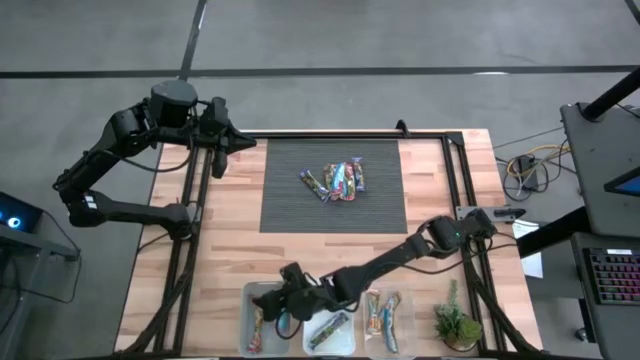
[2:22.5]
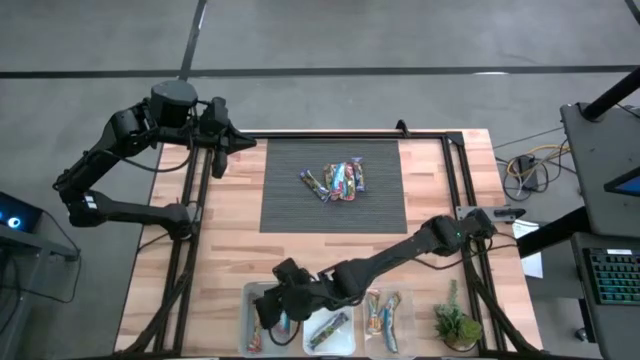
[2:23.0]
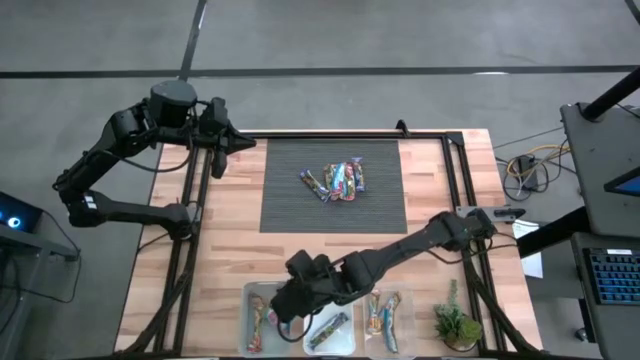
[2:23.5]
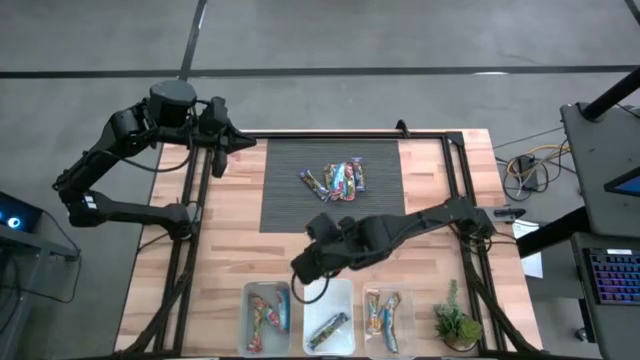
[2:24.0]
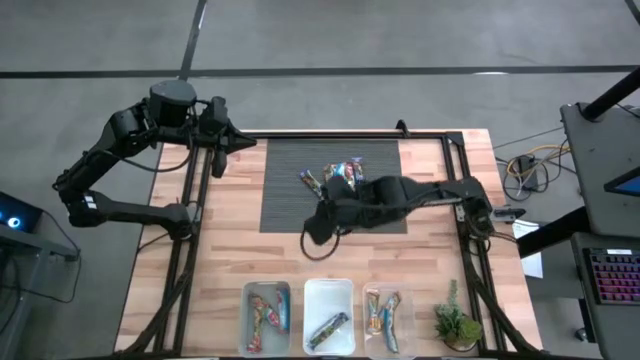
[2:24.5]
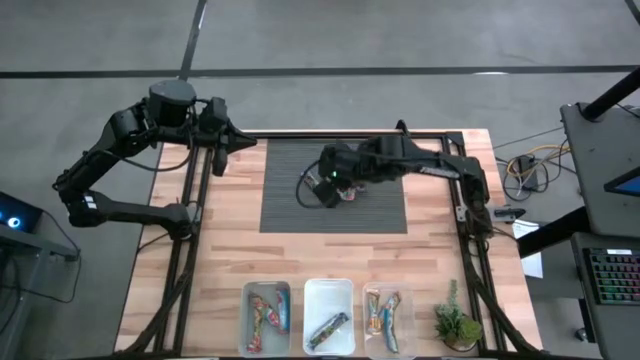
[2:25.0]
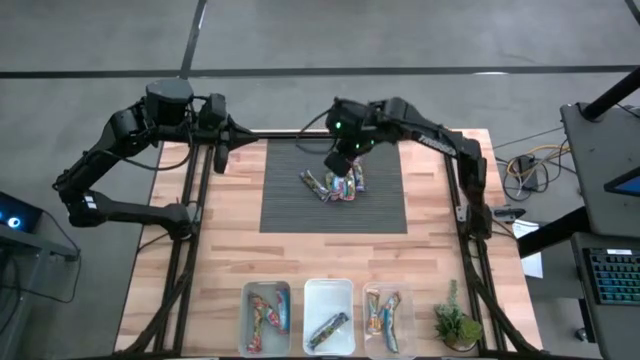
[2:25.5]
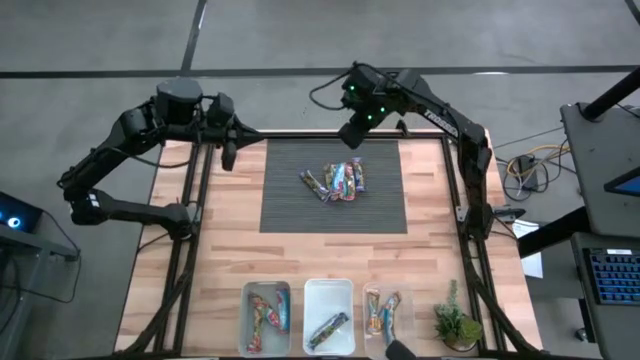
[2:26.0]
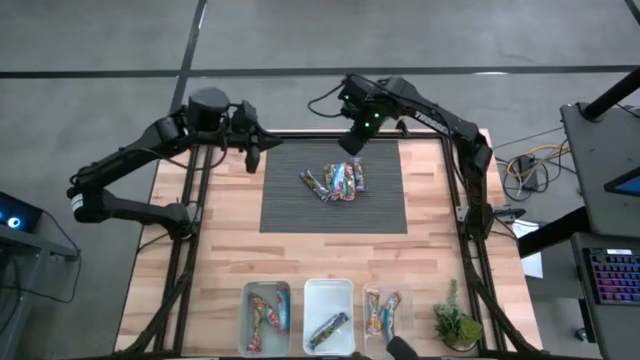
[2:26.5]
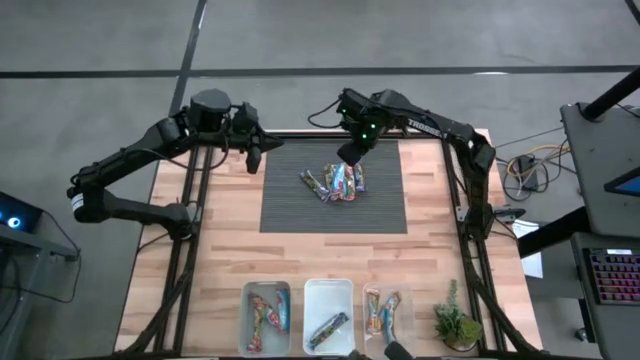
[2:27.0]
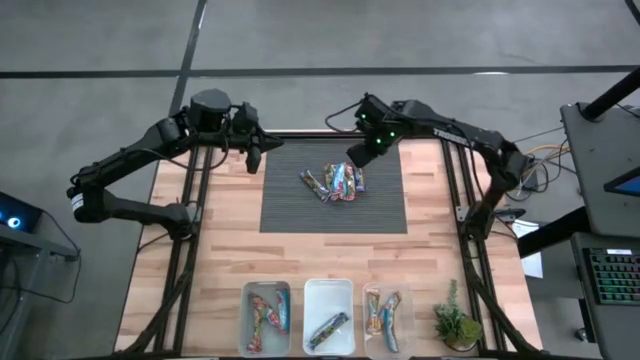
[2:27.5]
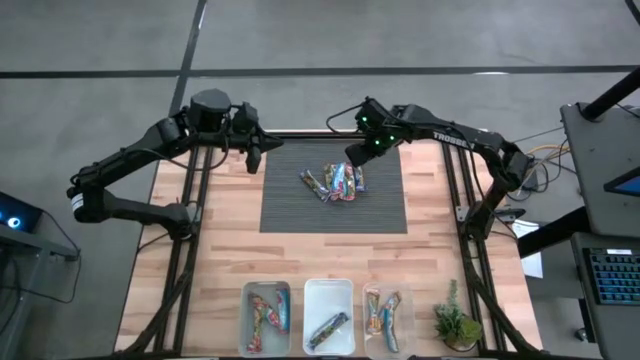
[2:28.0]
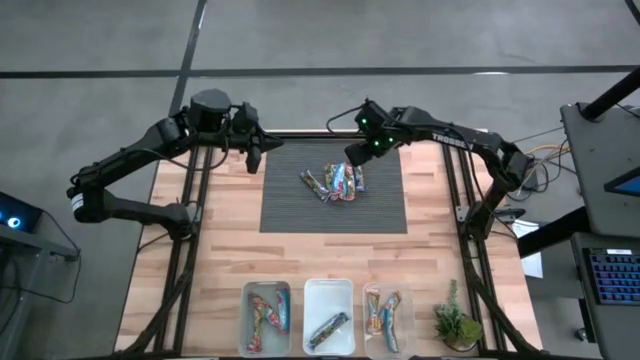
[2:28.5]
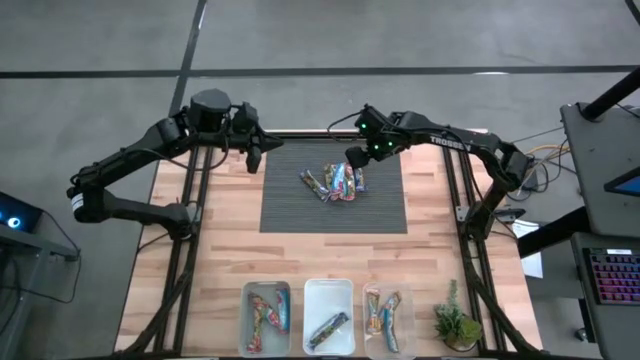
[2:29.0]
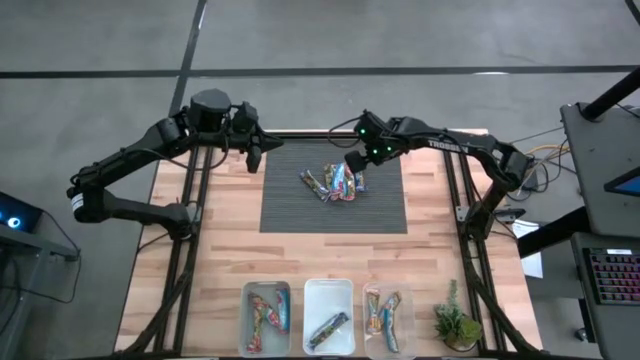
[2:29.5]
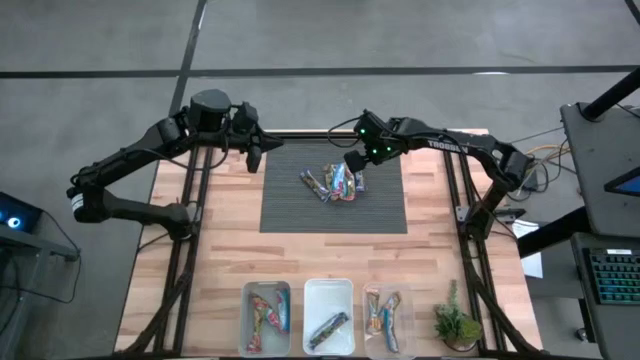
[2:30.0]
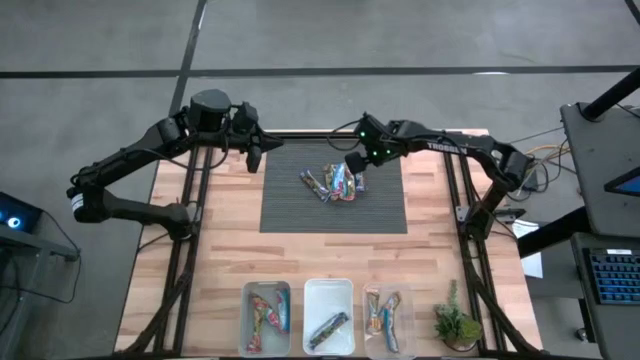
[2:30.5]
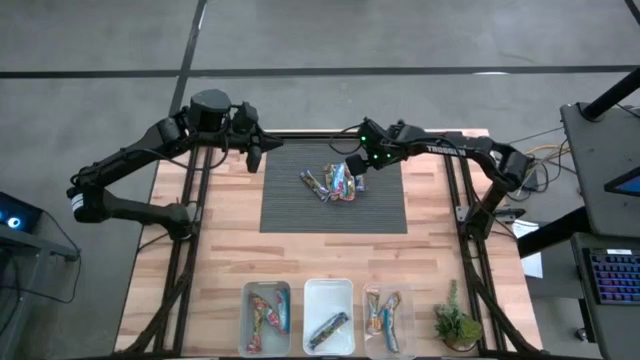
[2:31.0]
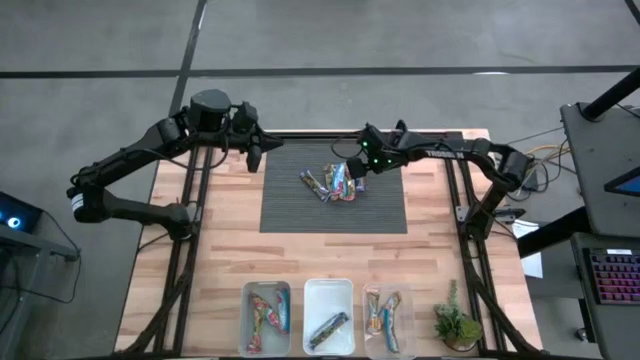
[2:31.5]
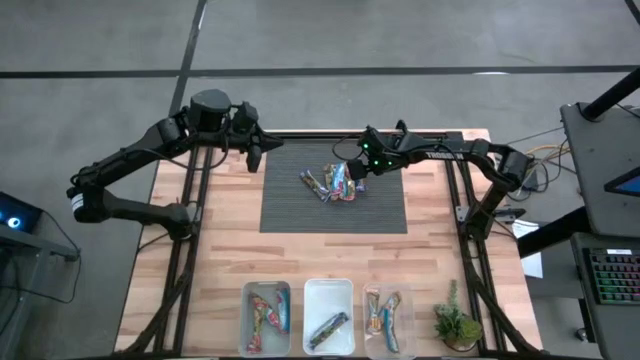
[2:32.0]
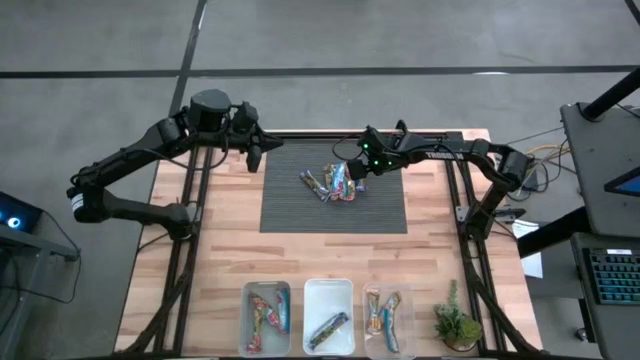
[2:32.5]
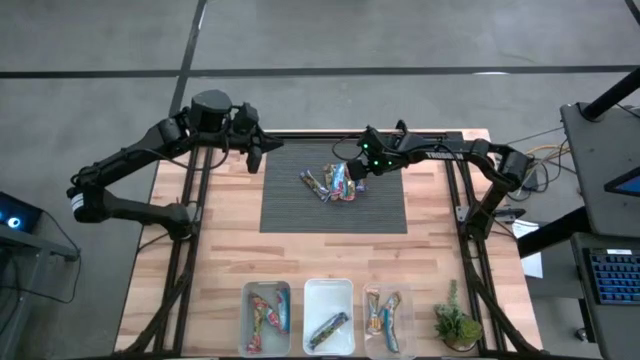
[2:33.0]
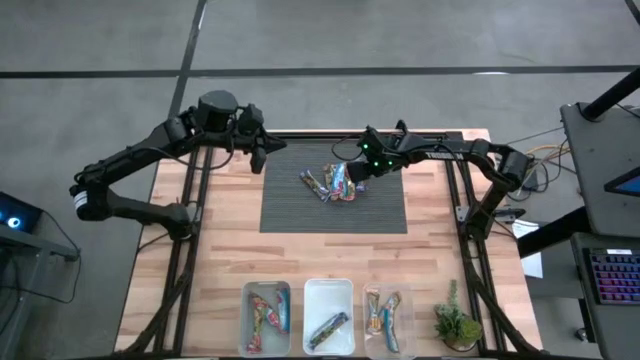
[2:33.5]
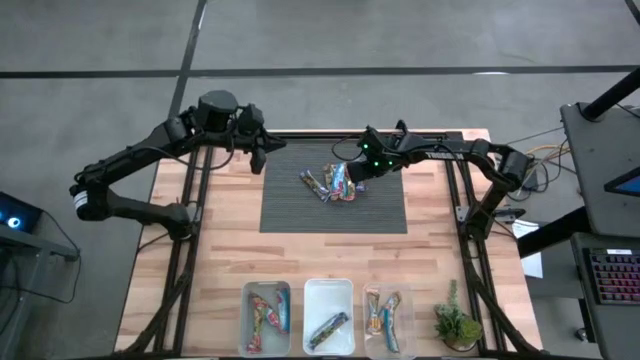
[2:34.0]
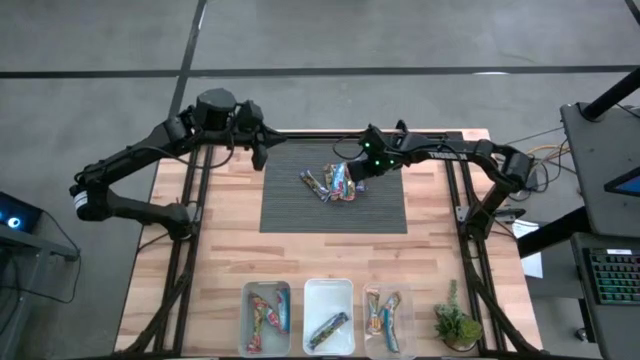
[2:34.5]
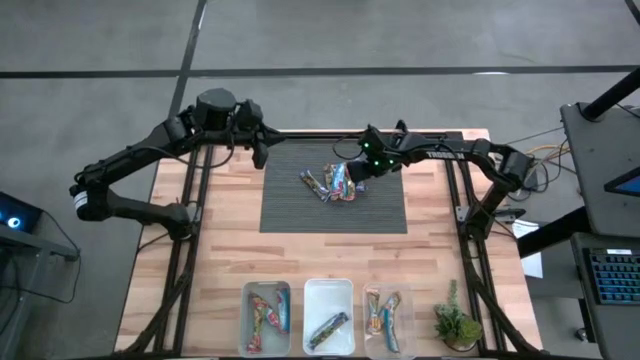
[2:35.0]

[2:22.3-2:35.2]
Task: Pick and place Granola Bars by type
Put the right blue granola bar into the white bin

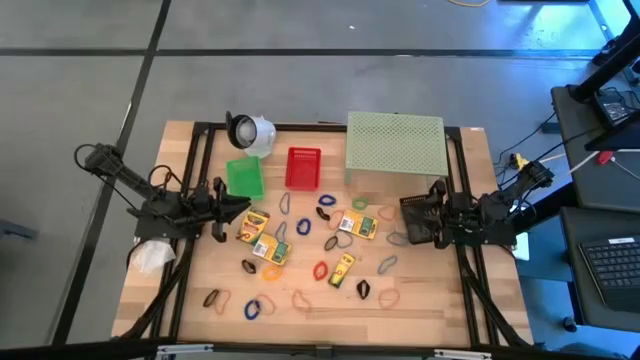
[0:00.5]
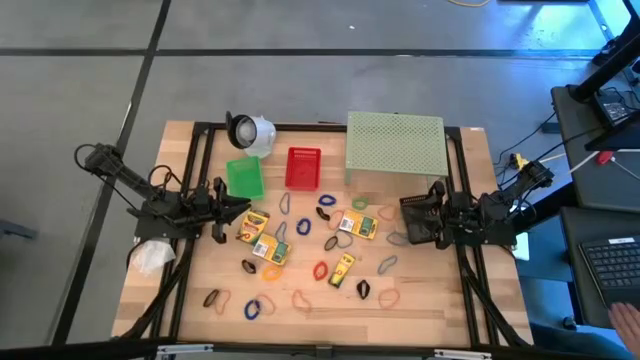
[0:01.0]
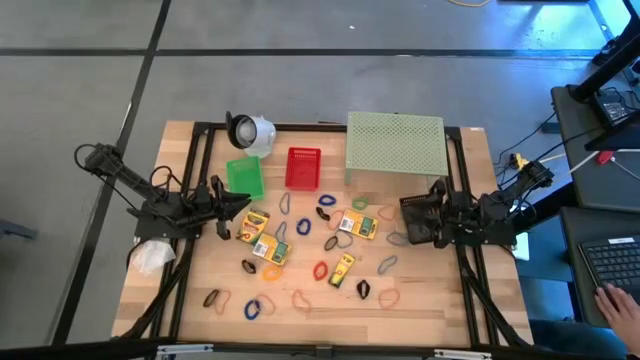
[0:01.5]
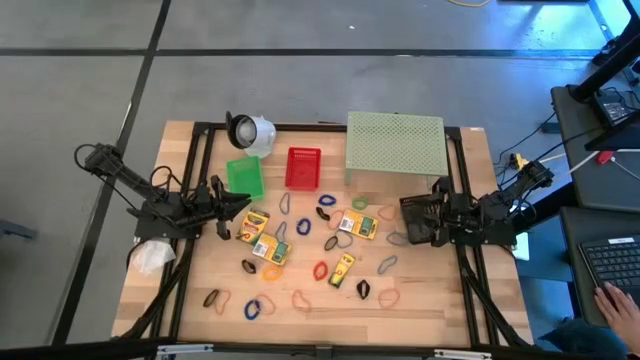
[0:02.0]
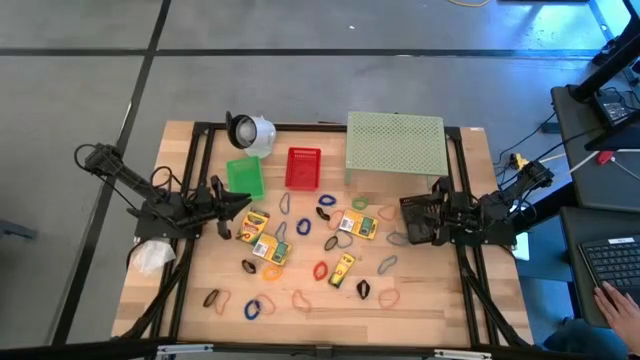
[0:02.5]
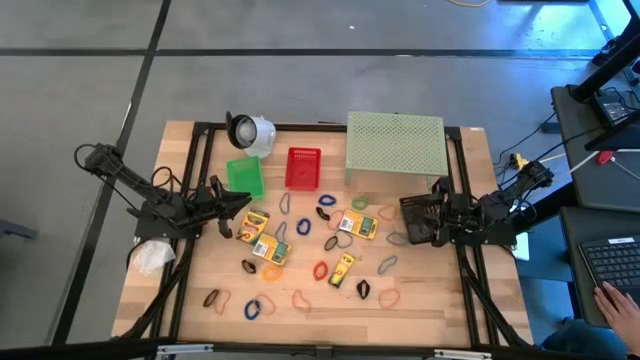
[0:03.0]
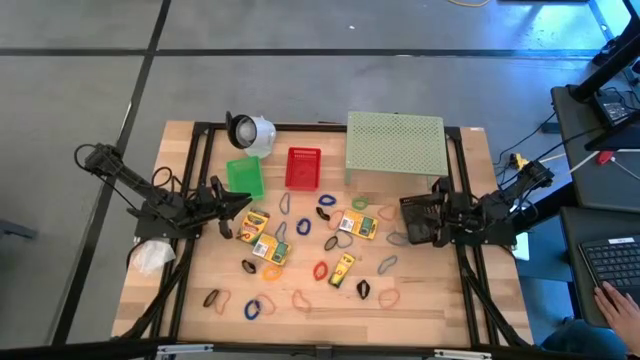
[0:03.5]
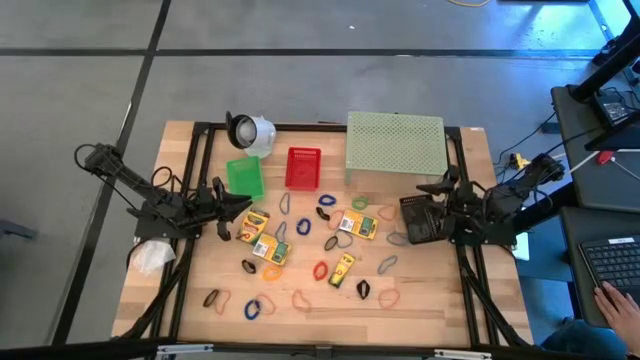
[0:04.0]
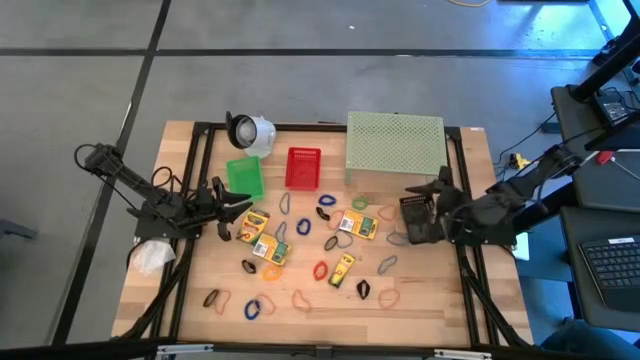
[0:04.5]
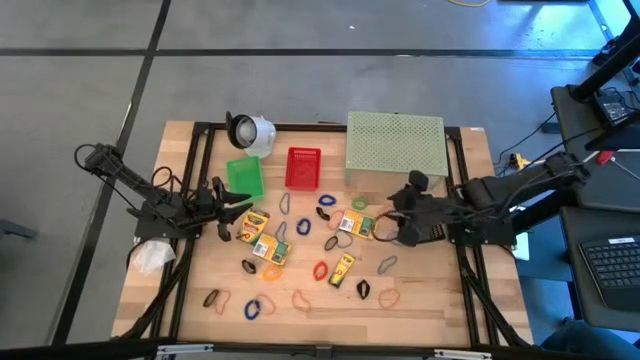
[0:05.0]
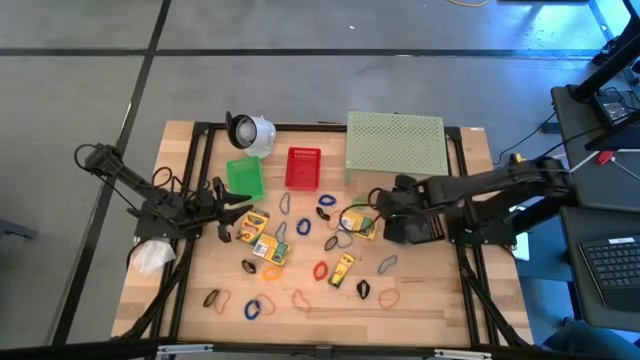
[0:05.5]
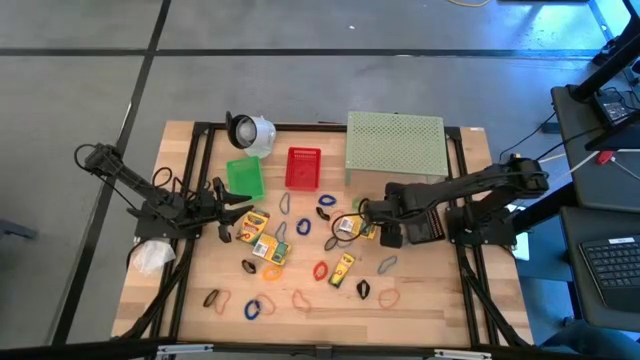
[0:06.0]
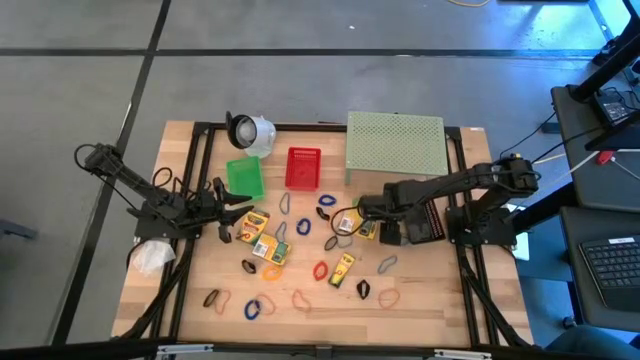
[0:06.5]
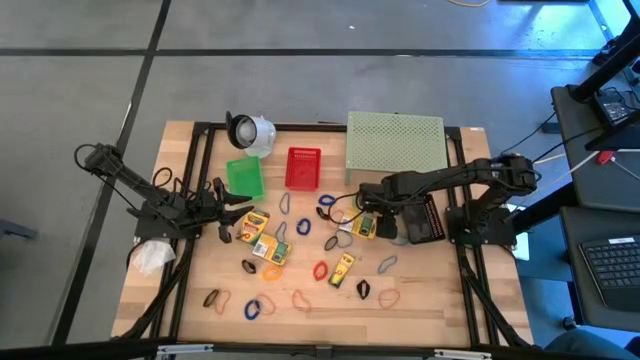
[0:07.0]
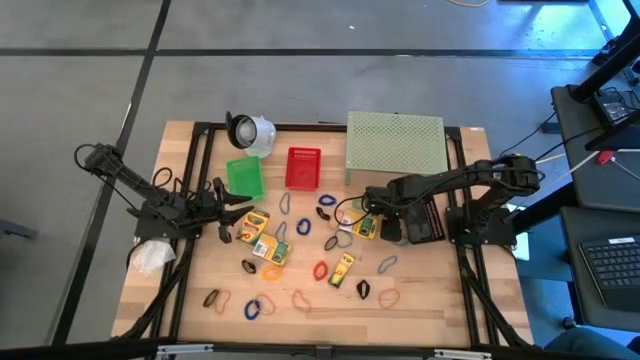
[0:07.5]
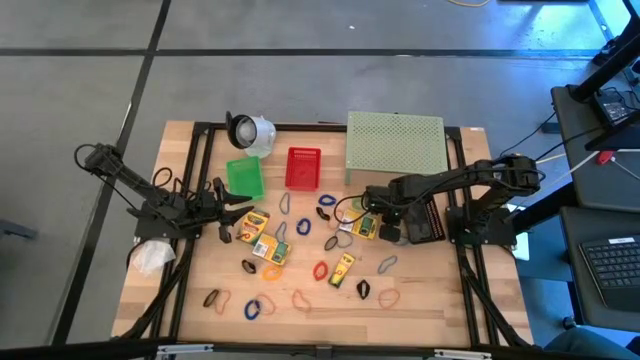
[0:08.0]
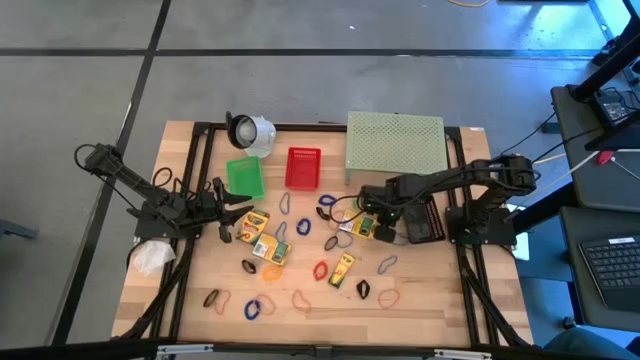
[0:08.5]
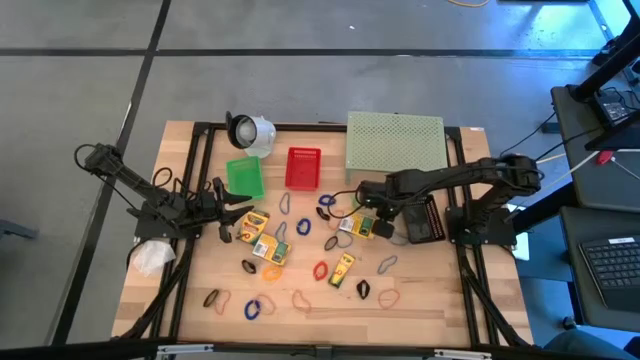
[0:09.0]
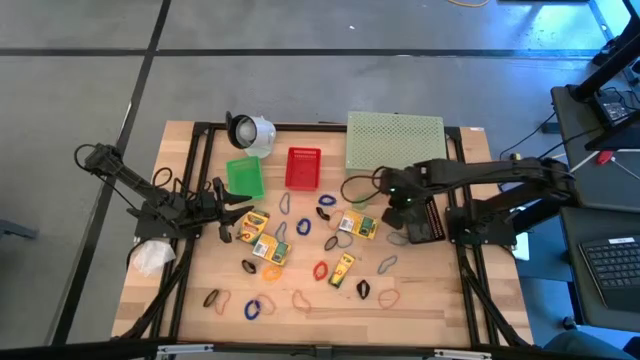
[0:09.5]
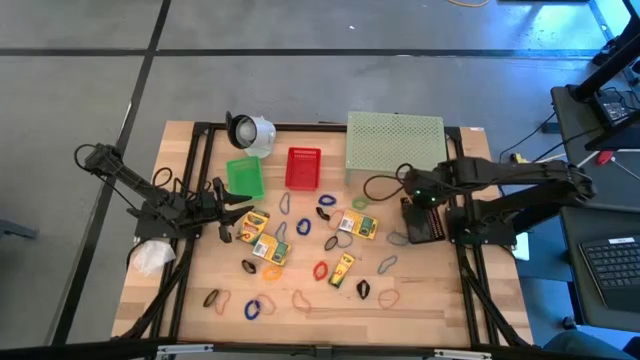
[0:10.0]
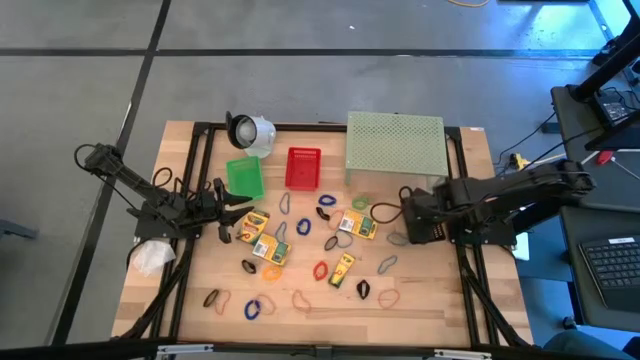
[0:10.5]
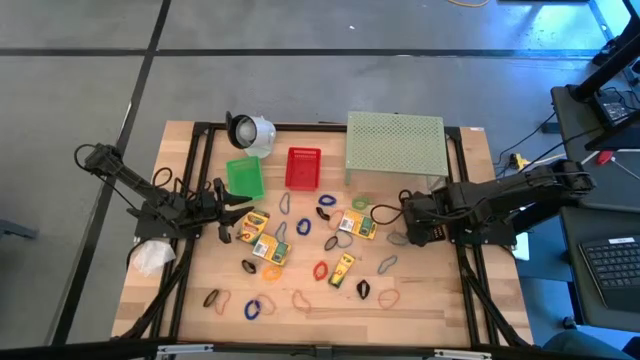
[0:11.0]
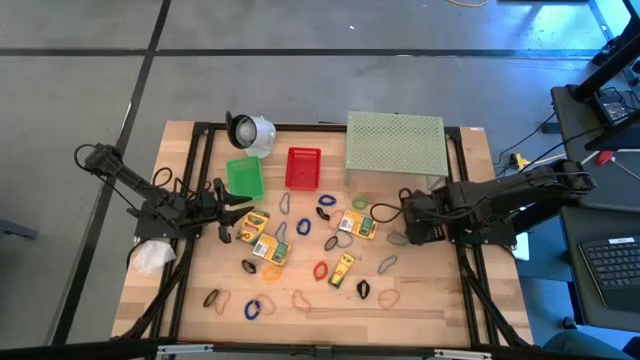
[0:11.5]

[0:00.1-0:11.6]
Task: Pick & Place Office Desk Supplies
Put the orange rubber band into the black basket
